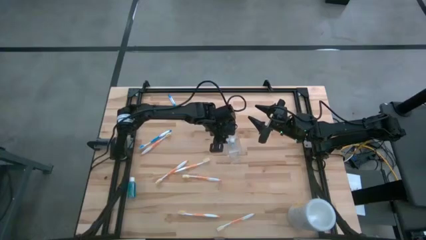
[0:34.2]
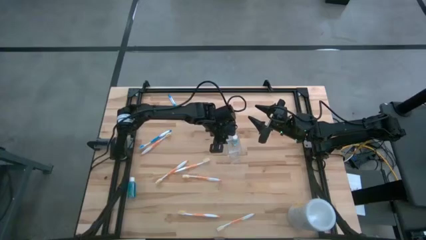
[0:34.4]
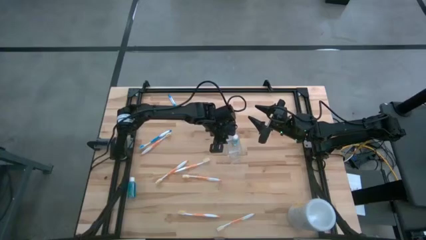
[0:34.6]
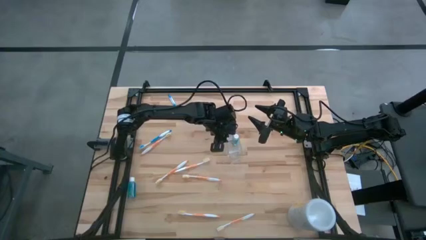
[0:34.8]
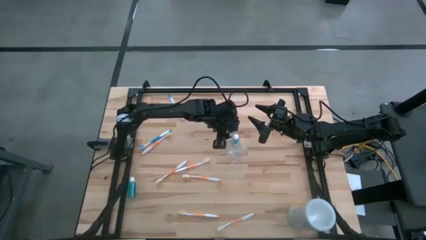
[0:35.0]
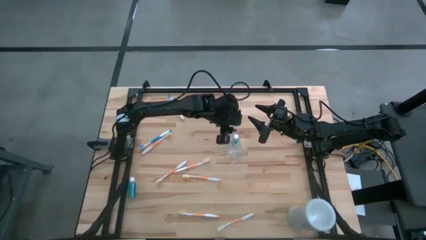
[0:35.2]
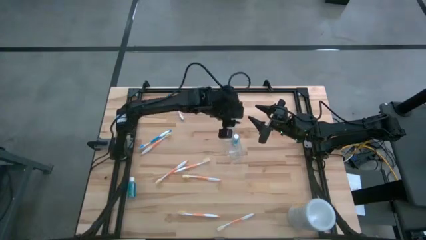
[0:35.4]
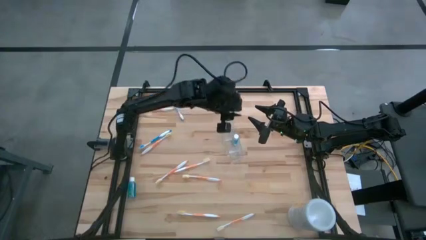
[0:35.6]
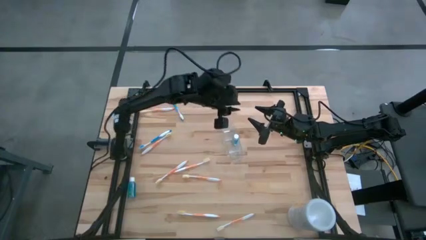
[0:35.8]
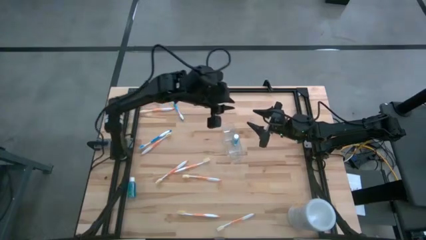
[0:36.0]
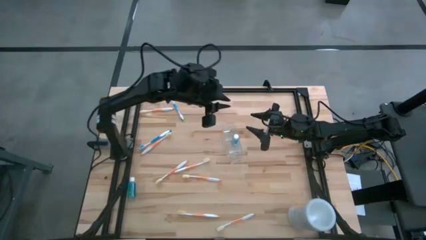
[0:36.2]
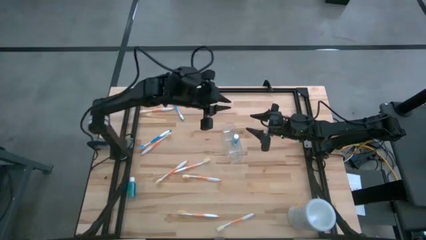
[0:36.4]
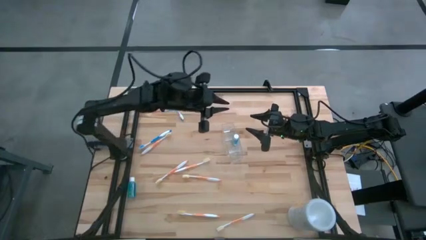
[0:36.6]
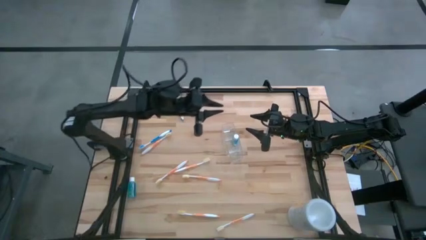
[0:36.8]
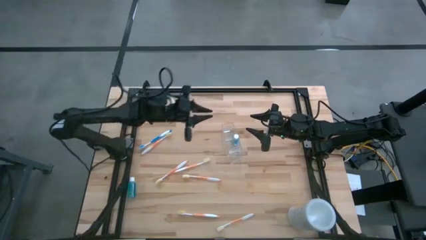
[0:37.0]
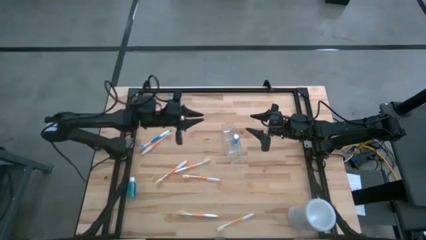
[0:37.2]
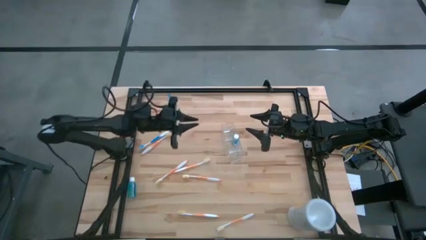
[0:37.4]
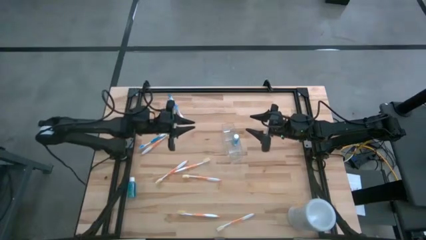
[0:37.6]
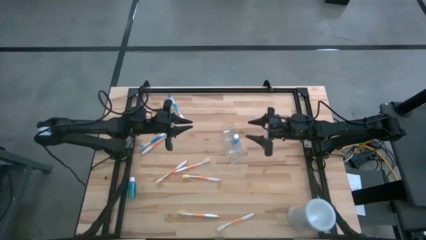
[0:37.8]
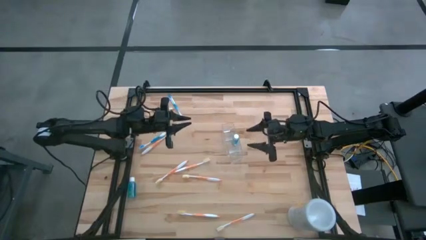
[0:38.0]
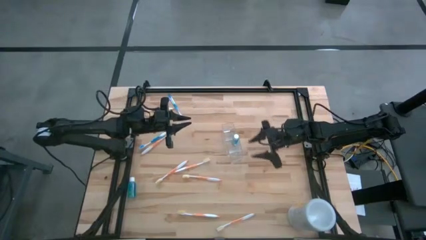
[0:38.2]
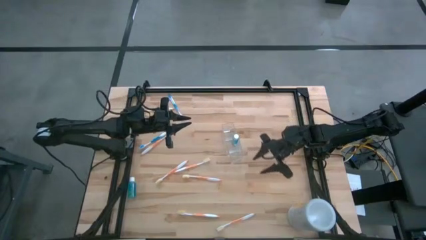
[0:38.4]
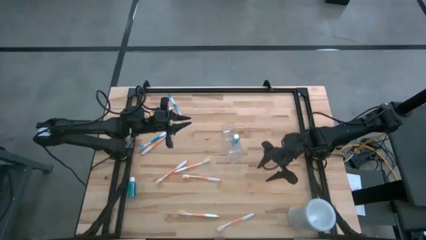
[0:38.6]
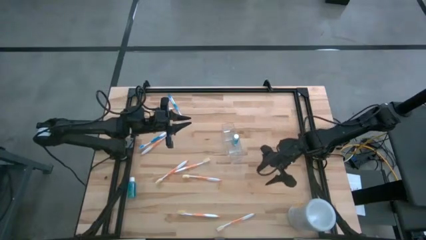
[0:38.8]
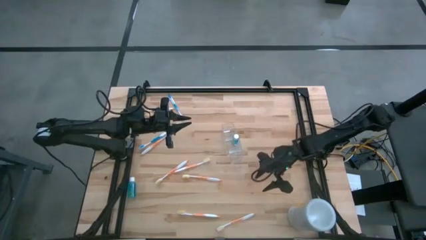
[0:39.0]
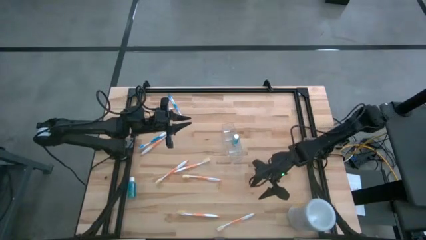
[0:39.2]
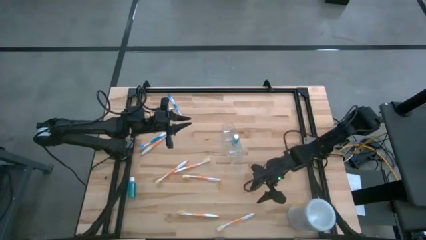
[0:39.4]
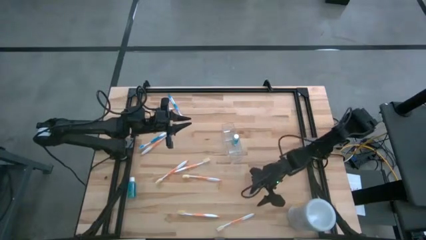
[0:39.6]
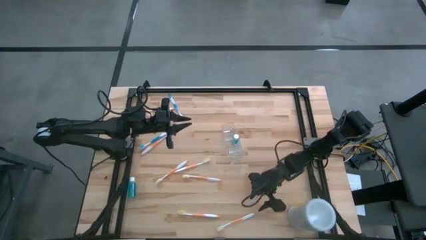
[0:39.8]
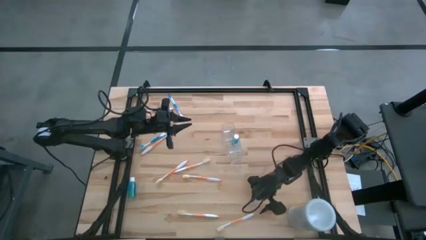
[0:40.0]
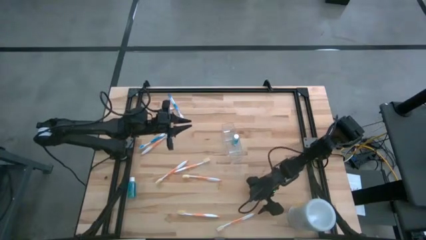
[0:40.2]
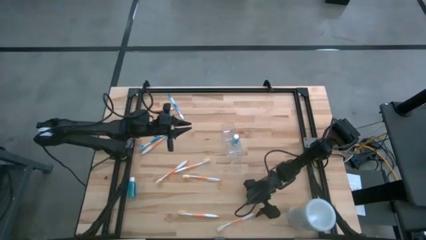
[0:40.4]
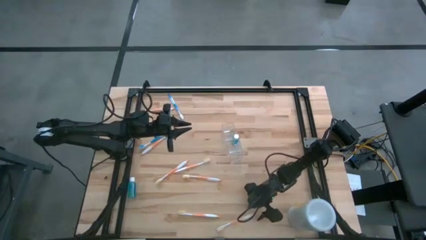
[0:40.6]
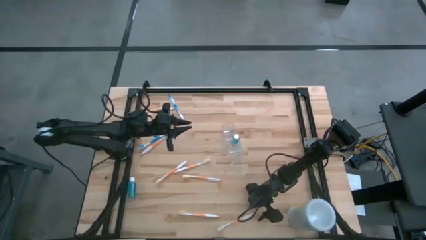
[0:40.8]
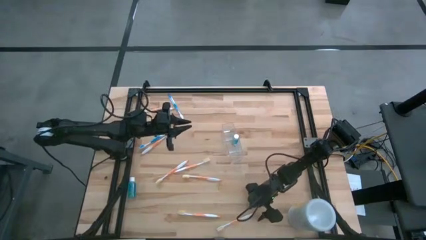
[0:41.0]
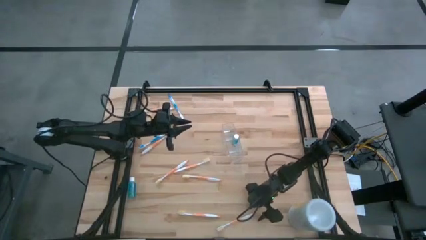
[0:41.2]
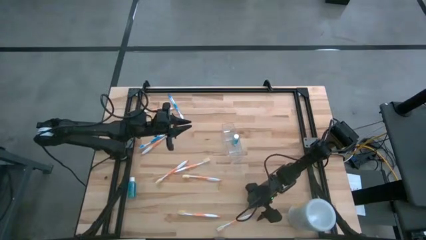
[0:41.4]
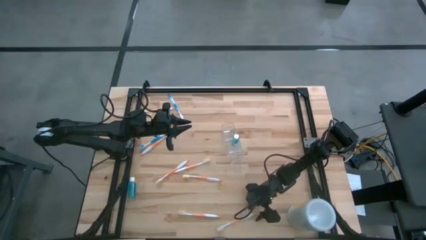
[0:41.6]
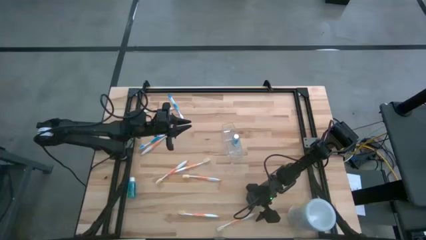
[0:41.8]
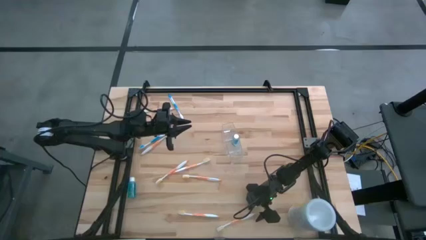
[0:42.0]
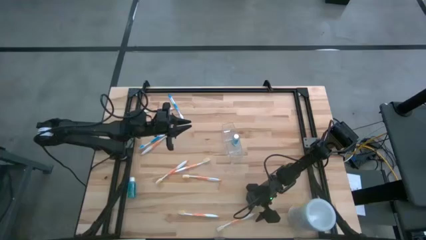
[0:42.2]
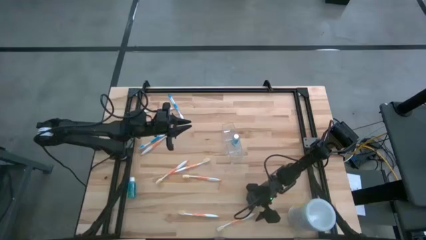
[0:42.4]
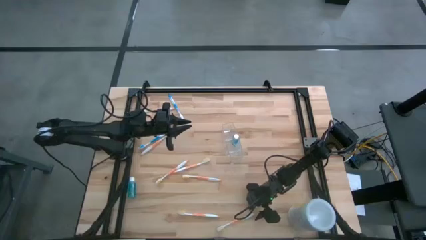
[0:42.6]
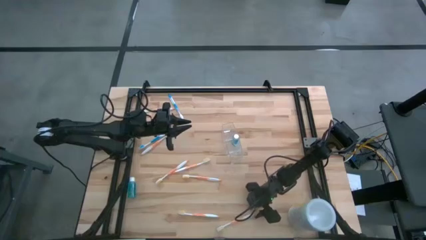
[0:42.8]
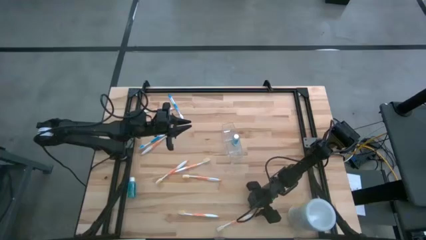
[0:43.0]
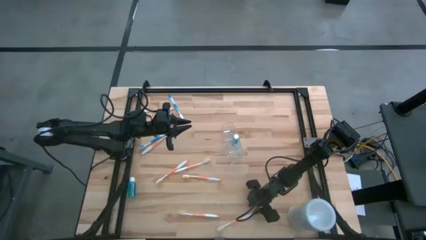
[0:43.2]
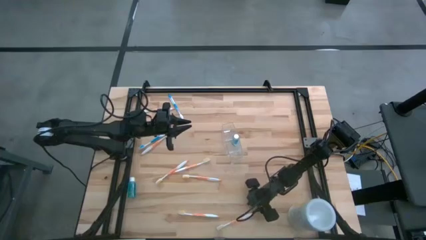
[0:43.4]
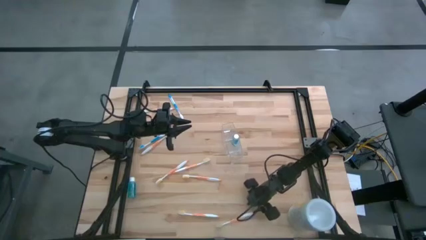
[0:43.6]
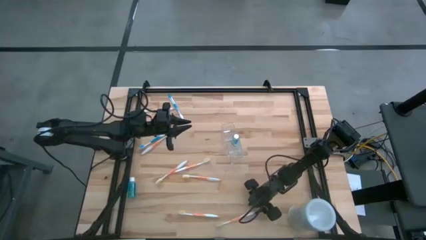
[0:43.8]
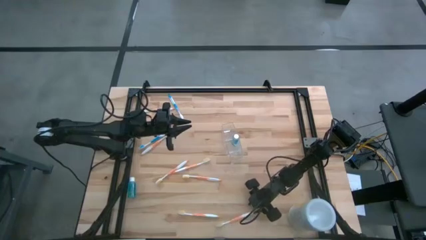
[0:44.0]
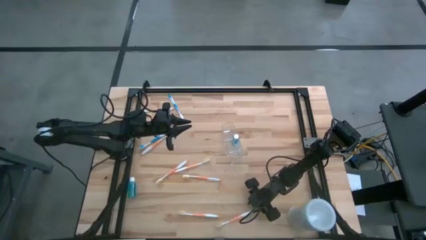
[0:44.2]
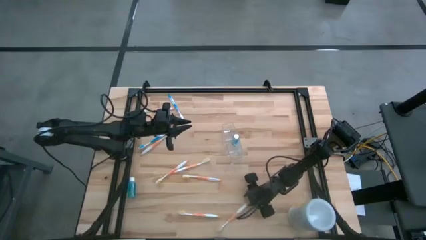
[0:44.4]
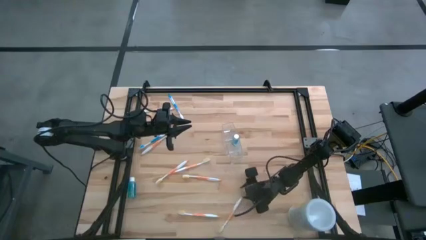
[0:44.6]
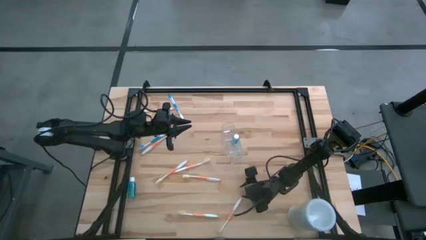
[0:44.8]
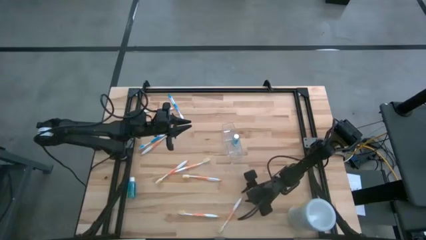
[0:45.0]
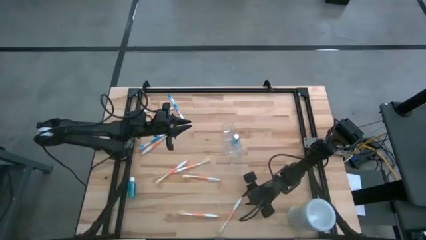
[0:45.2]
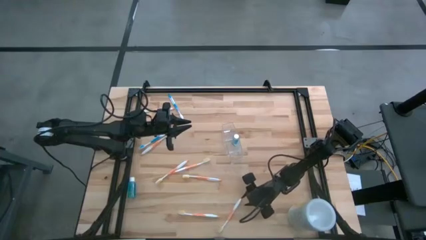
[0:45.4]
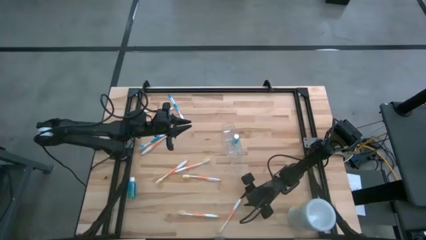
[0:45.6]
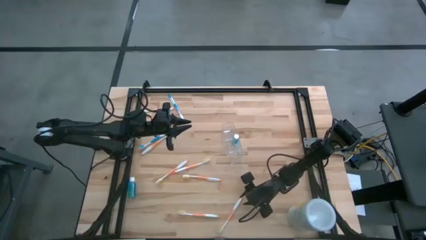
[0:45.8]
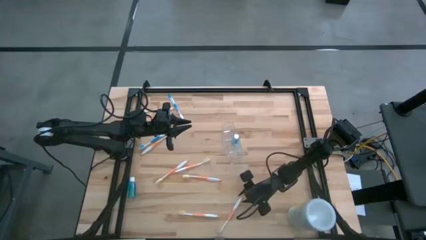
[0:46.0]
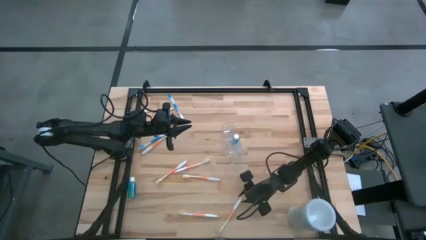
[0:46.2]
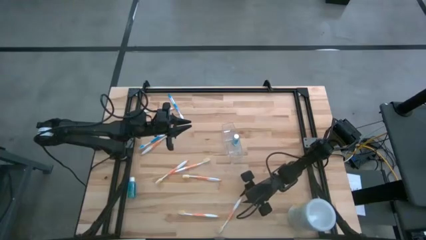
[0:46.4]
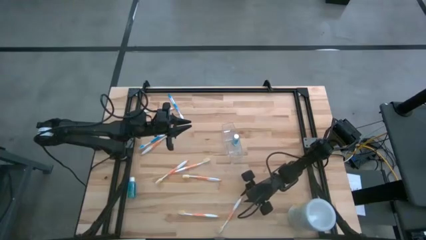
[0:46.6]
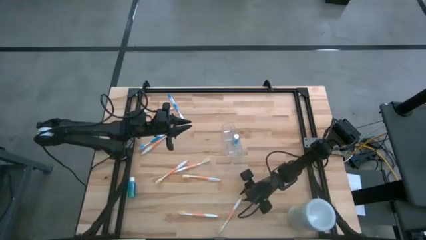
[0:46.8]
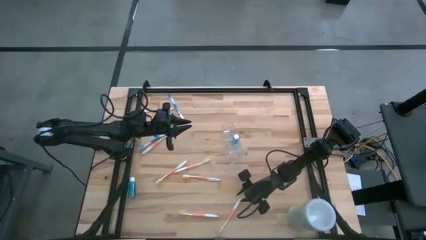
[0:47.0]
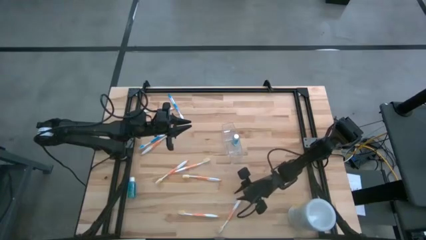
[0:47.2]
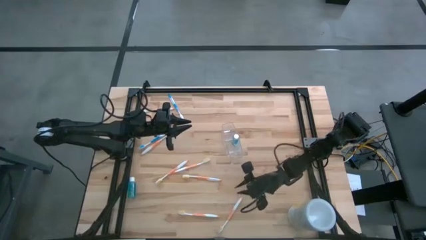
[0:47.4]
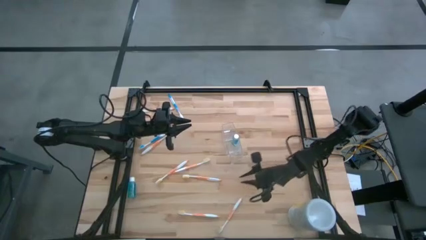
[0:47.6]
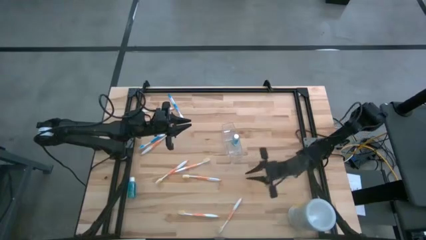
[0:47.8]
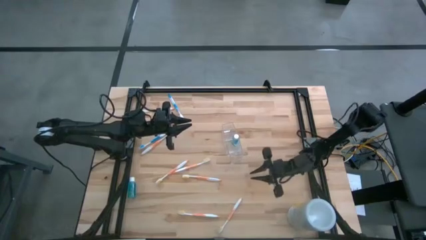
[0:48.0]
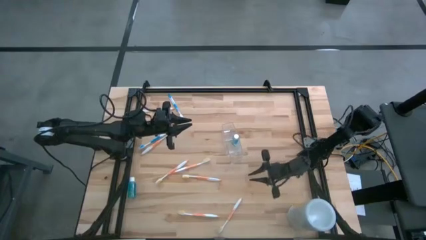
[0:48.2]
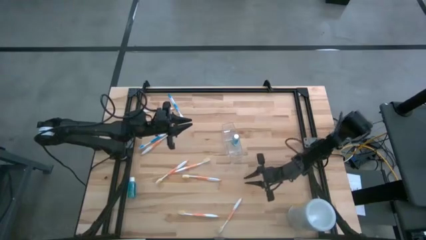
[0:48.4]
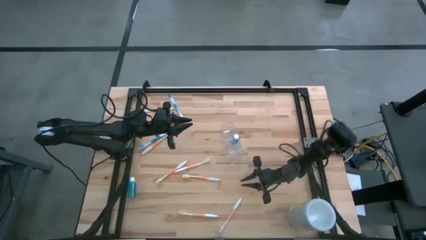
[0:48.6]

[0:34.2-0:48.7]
Task: Pick & Place toothbrushing station
Put the orange toothbrush into transparent organizer

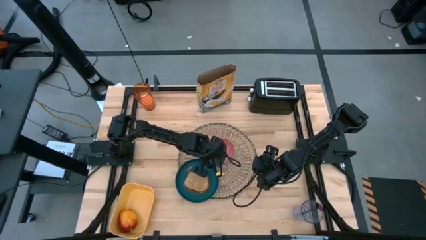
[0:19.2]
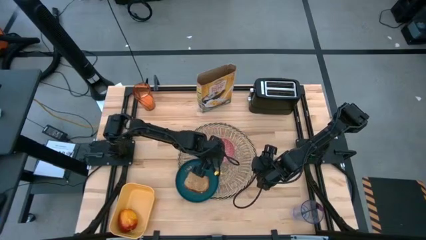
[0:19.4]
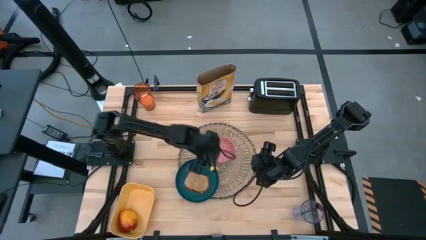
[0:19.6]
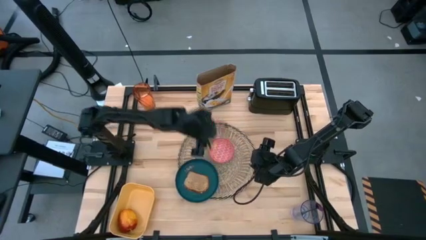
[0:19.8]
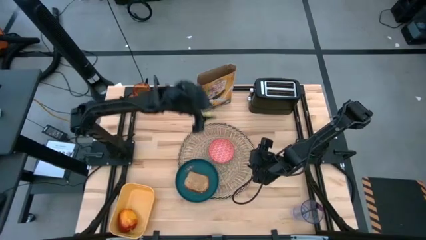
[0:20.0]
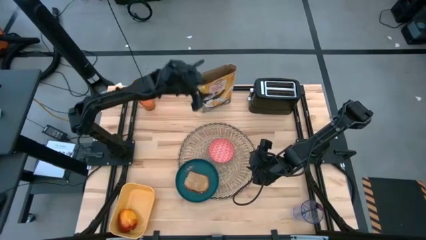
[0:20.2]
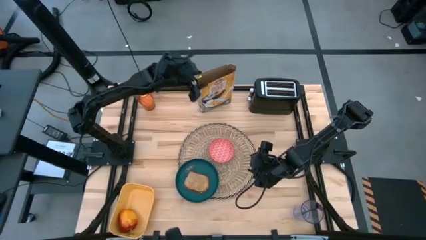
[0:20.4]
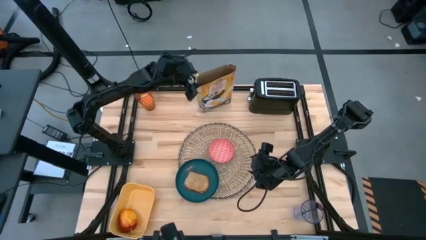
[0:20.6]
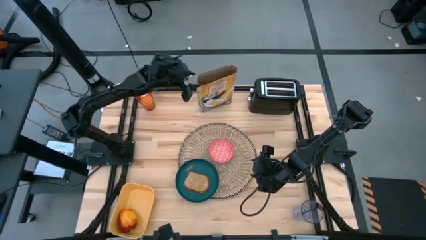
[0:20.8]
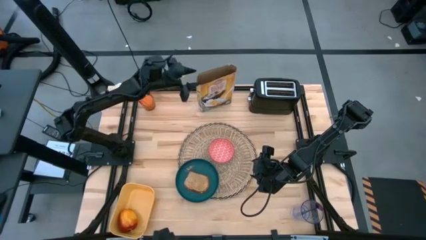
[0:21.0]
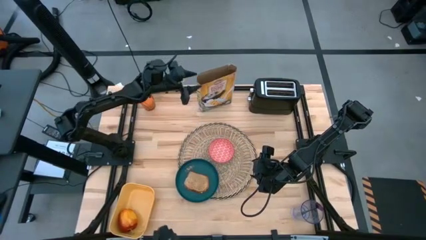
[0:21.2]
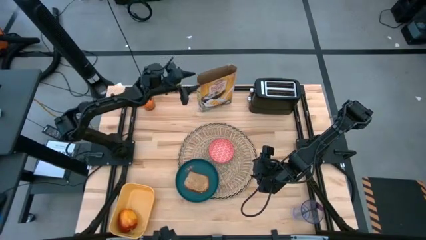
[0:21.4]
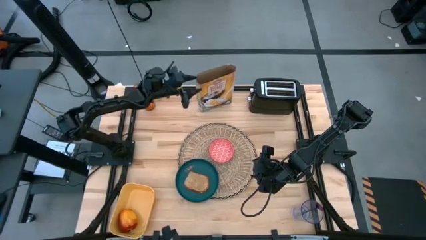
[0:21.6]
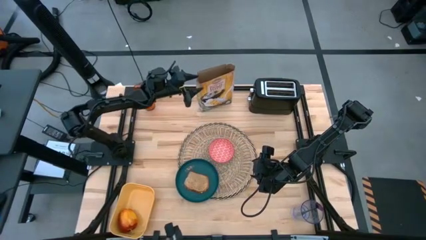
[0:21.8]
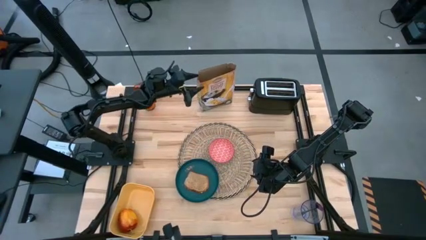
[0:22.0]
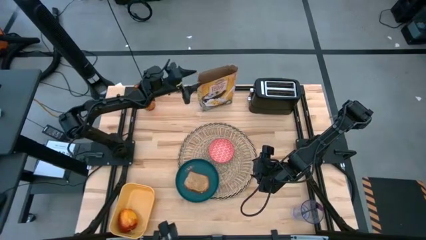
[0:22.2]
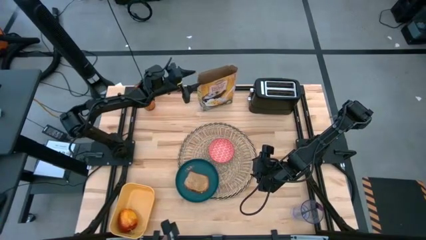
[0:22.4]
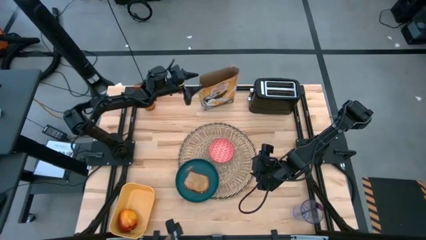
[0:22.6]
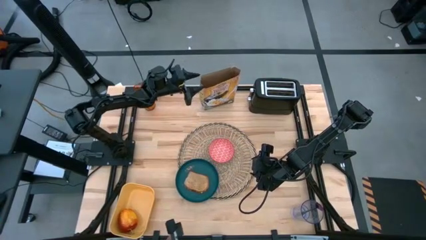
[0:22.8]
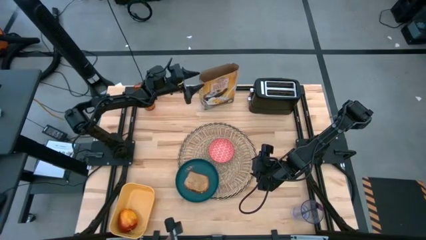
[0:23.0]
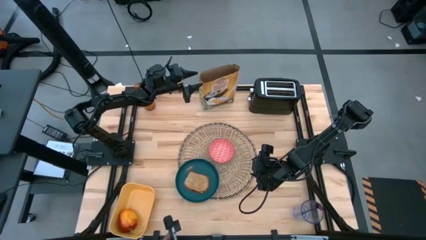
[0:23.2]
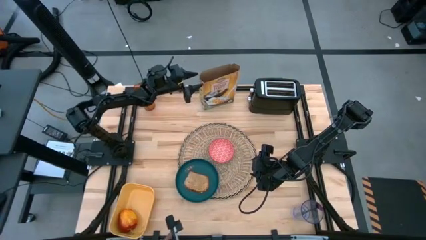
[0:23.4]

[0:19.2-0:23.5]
Task: Arrange a breakfast setting
Pour the cereal from the yellow cereal box into the red patterned bowl
